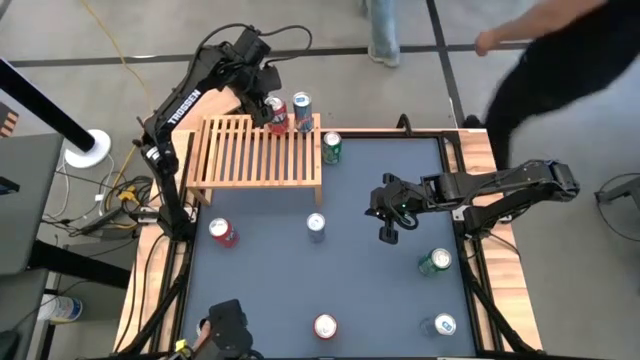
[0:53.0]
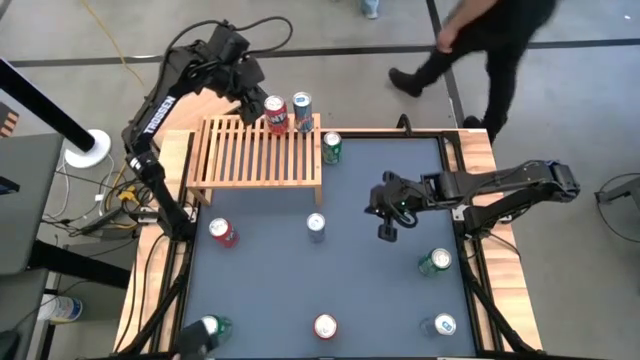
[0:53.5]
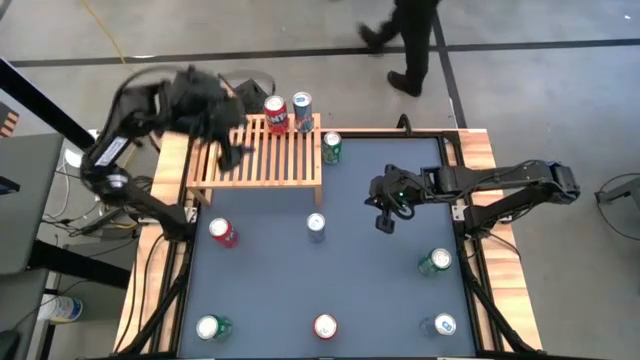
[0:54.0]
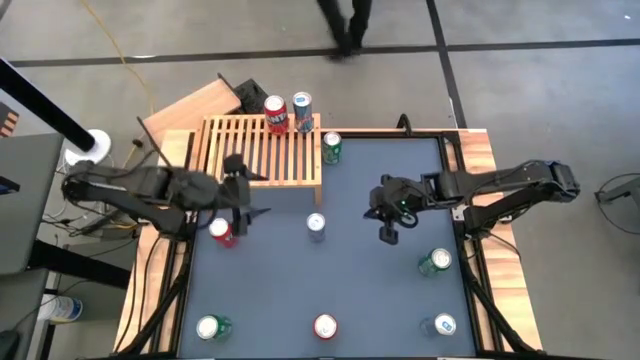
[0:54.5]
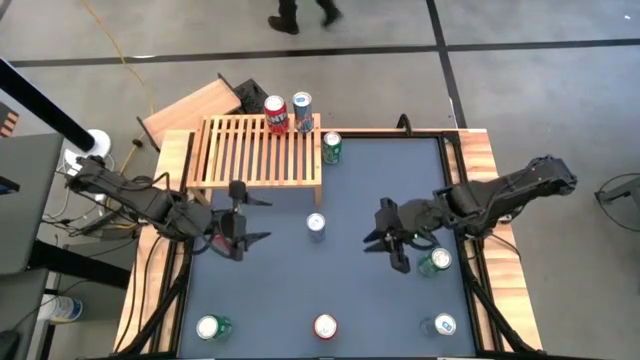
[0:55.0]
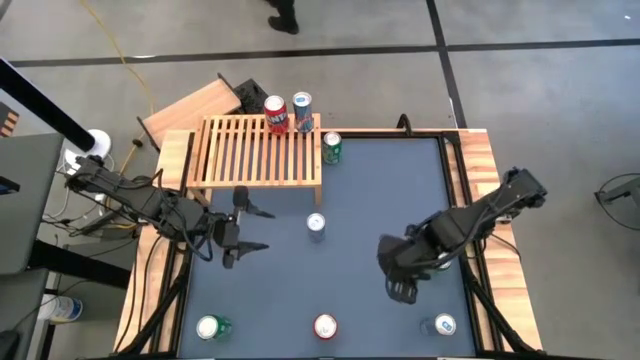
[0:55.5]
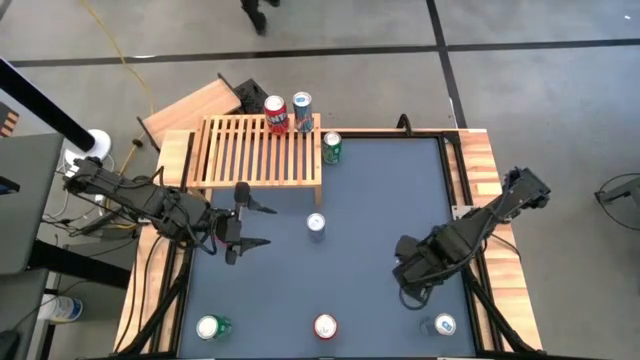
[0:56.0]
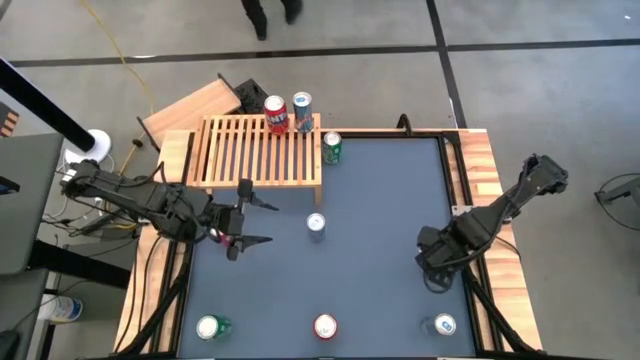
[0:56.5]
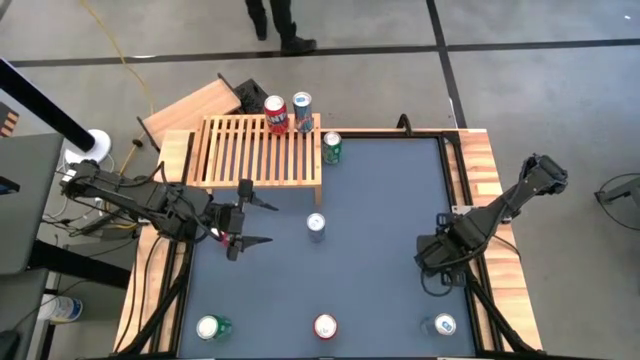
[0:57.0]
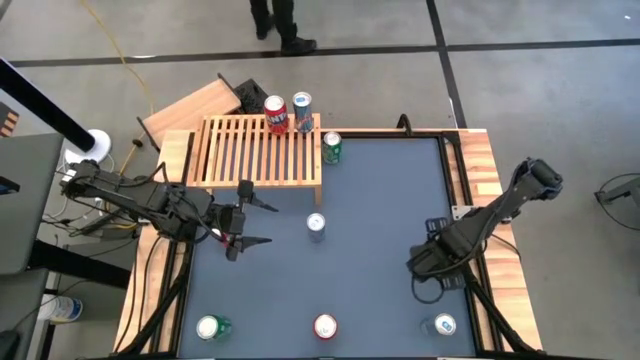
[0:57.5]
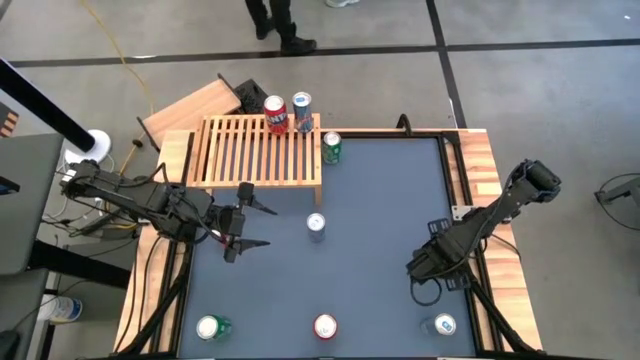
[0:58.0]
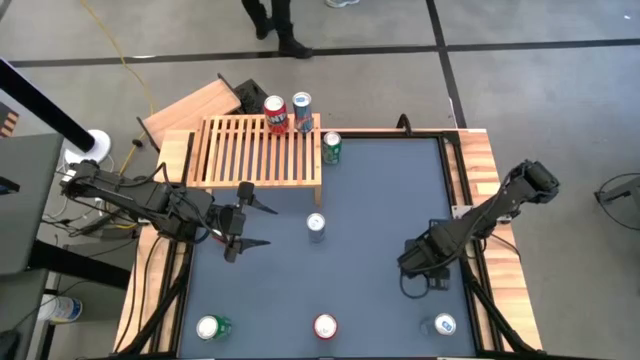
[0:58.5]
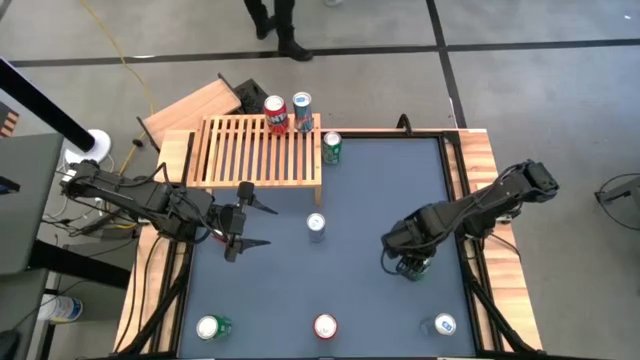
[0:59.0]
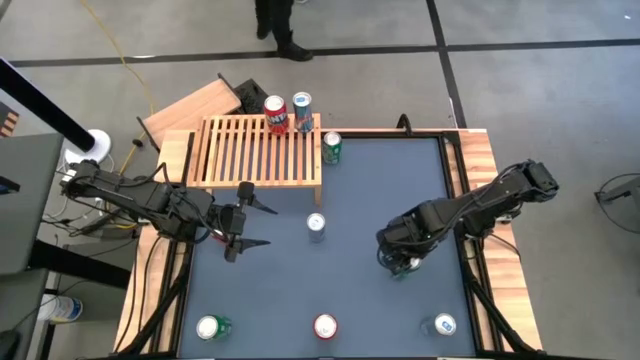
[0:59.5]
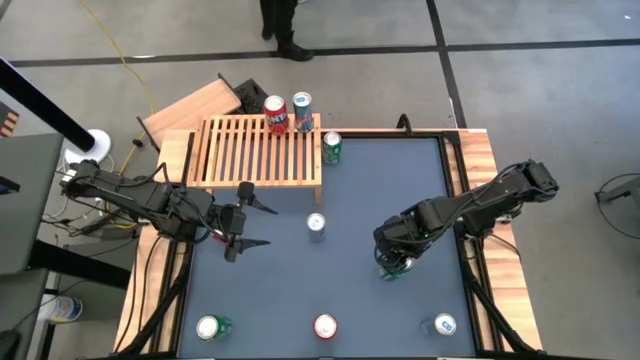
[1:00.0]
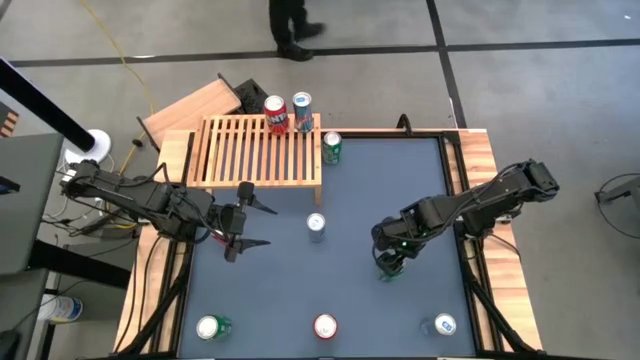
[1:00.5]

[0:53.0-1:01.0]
Task: Place canned beverage on shelf
Put the middle right green soda can on the shelf

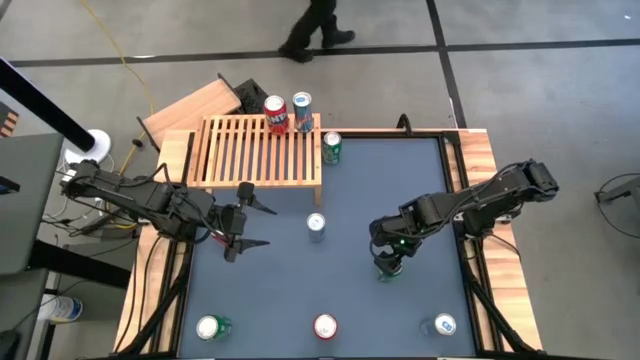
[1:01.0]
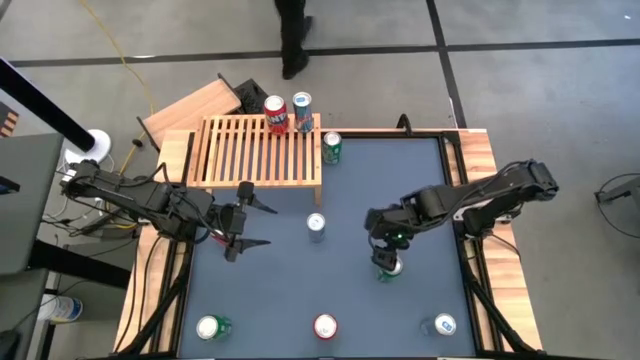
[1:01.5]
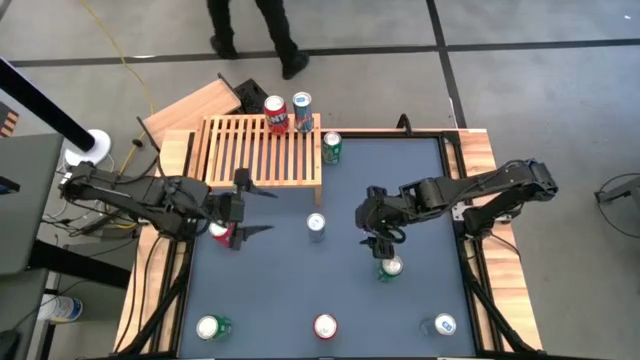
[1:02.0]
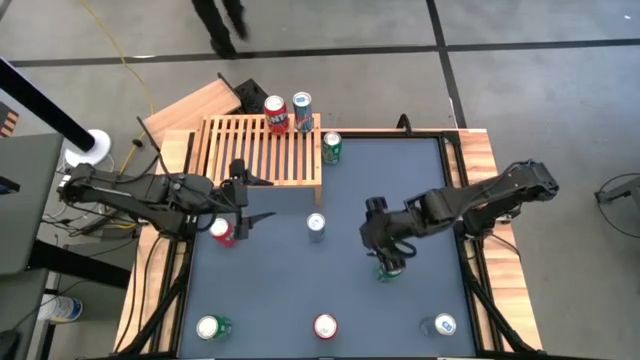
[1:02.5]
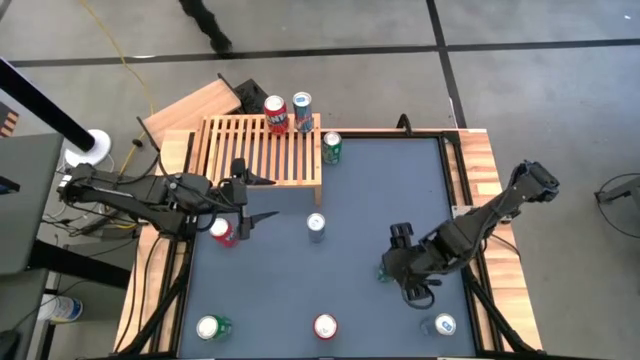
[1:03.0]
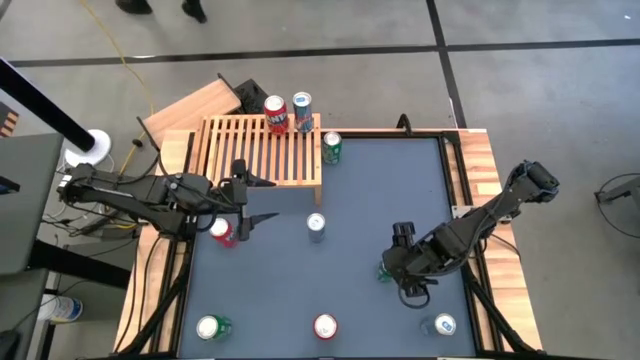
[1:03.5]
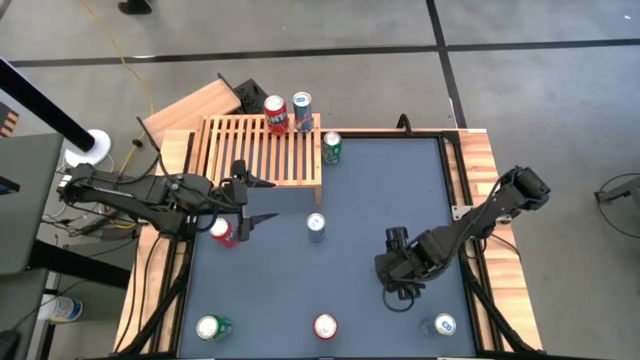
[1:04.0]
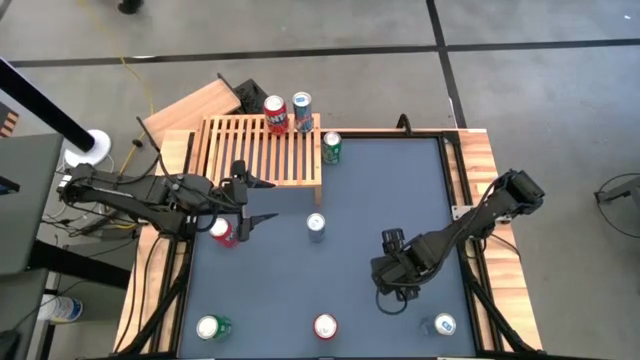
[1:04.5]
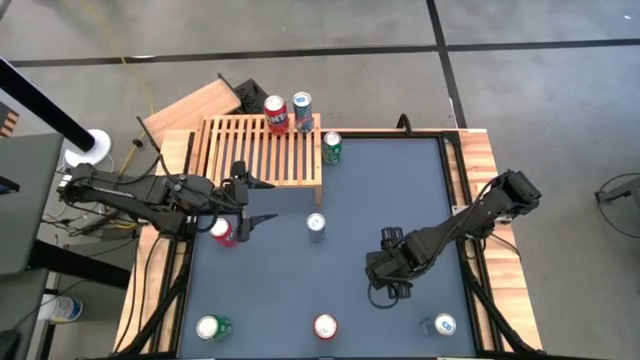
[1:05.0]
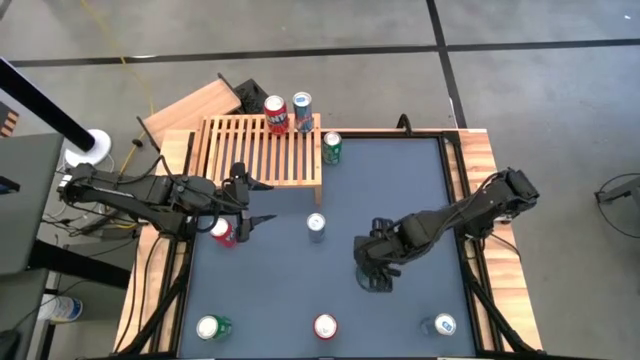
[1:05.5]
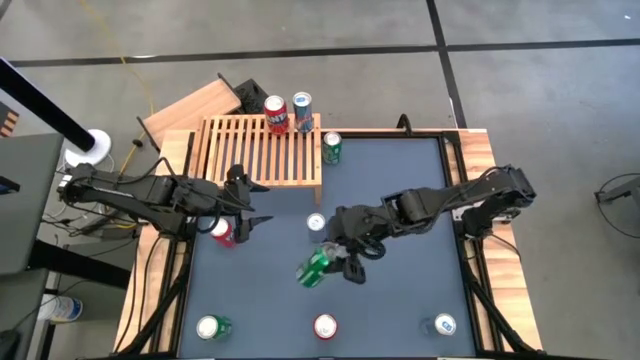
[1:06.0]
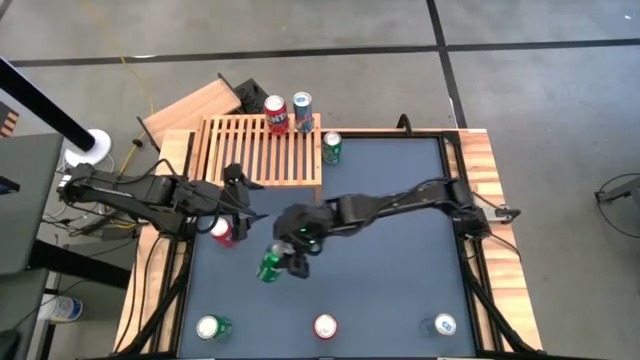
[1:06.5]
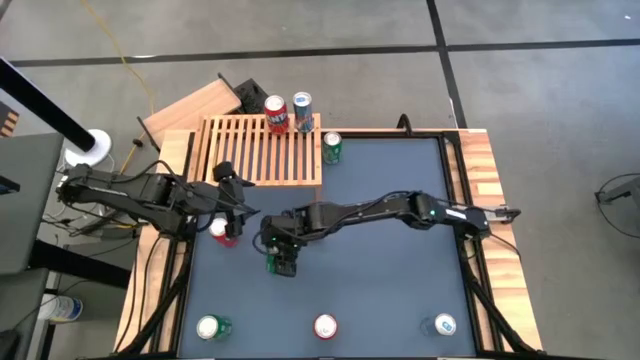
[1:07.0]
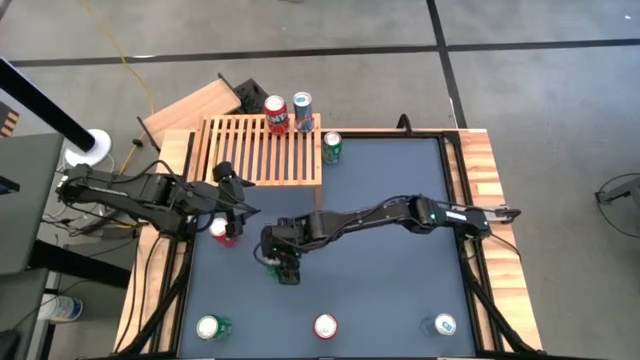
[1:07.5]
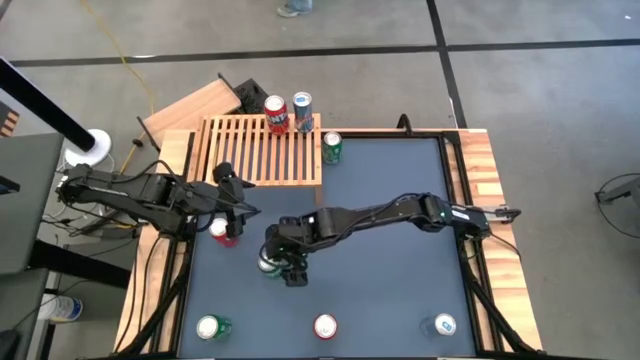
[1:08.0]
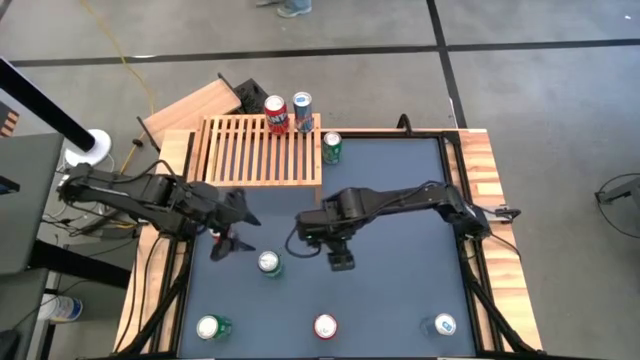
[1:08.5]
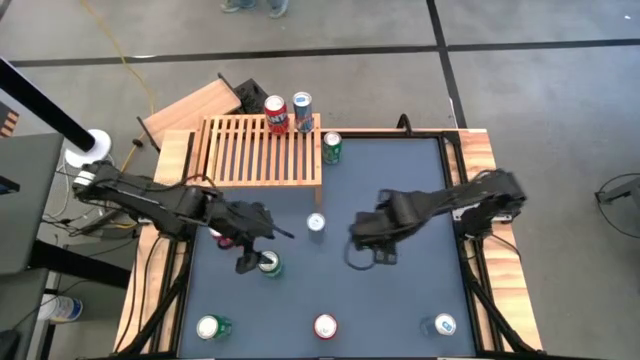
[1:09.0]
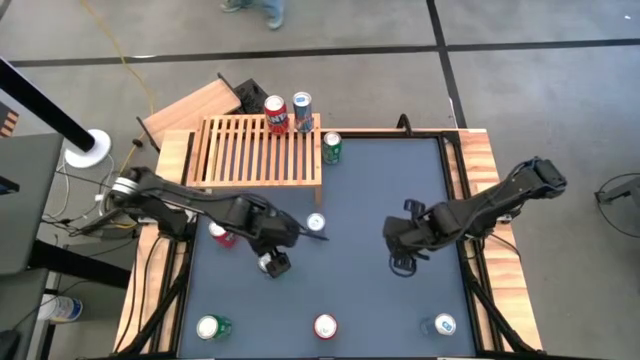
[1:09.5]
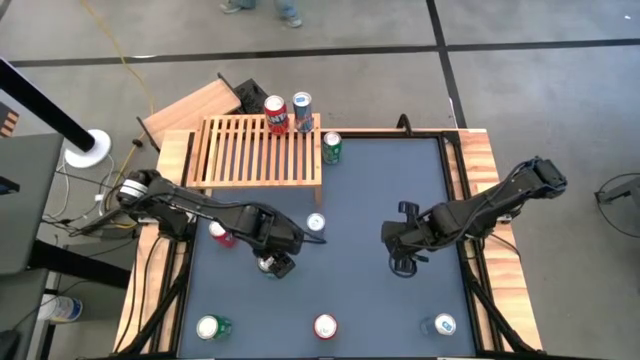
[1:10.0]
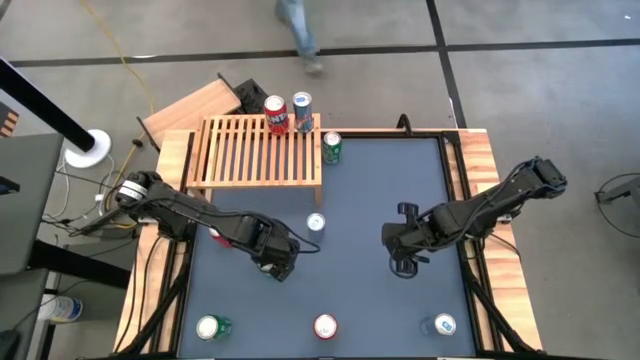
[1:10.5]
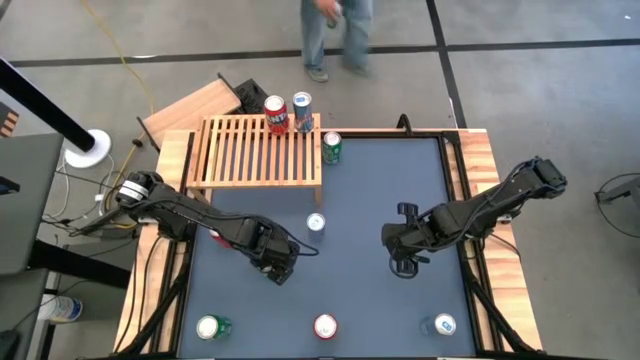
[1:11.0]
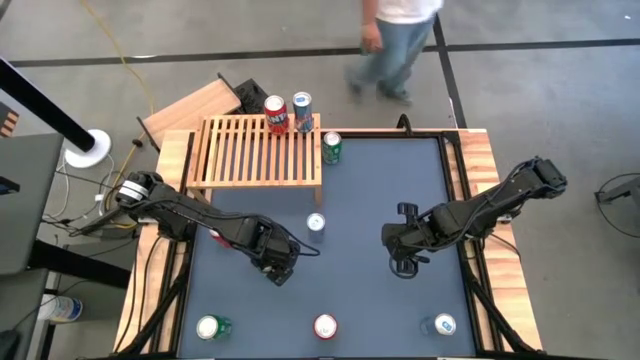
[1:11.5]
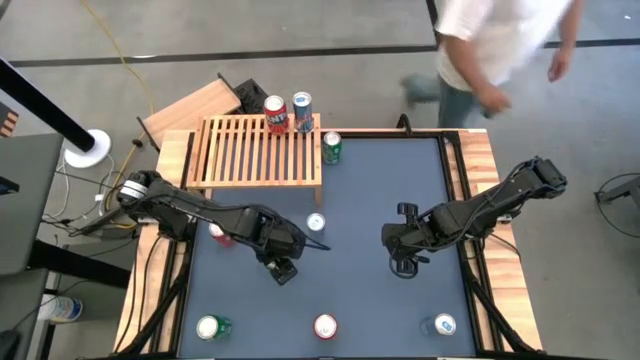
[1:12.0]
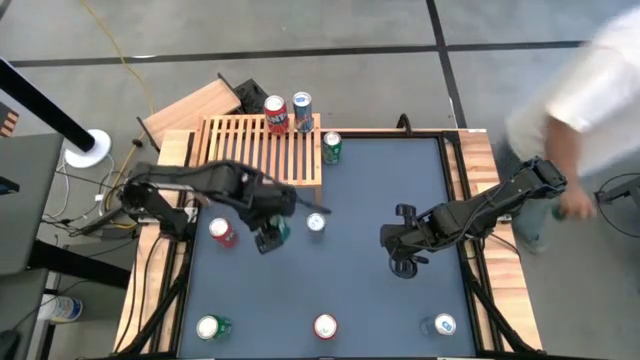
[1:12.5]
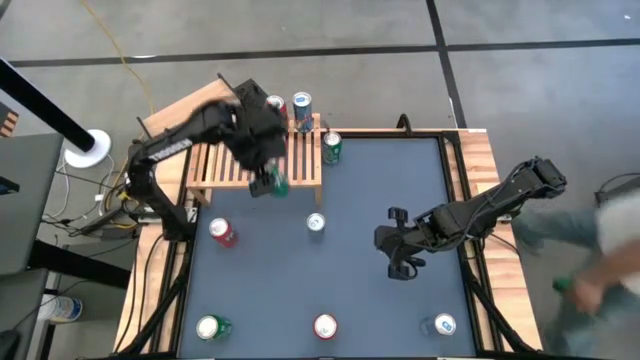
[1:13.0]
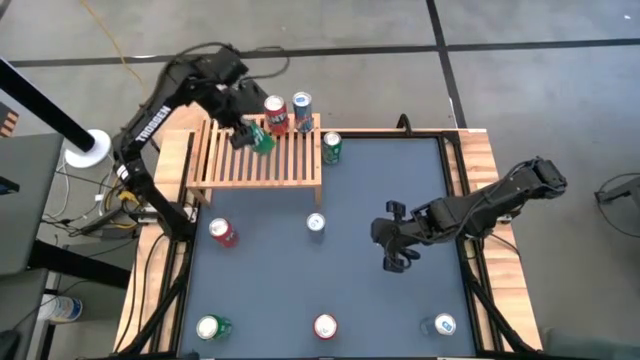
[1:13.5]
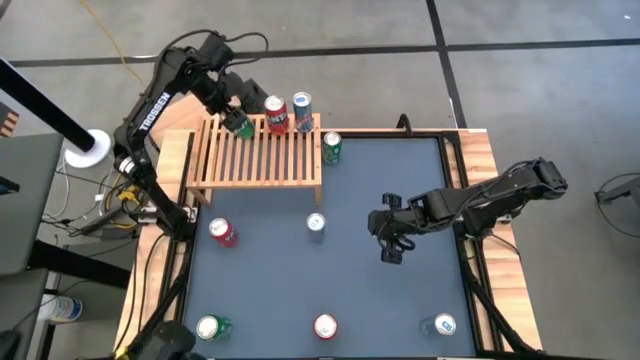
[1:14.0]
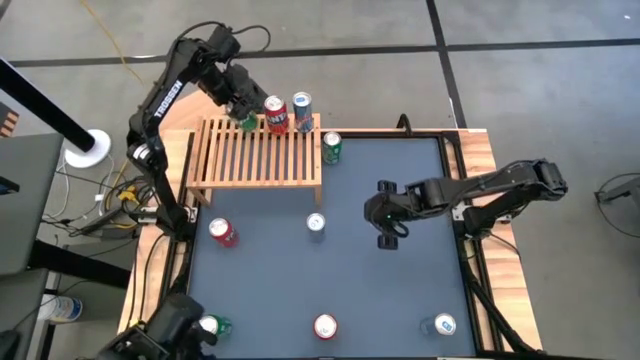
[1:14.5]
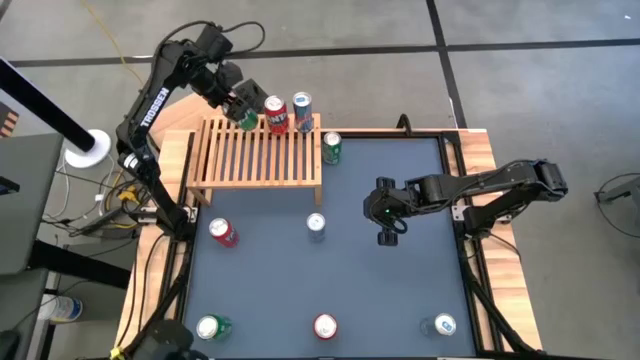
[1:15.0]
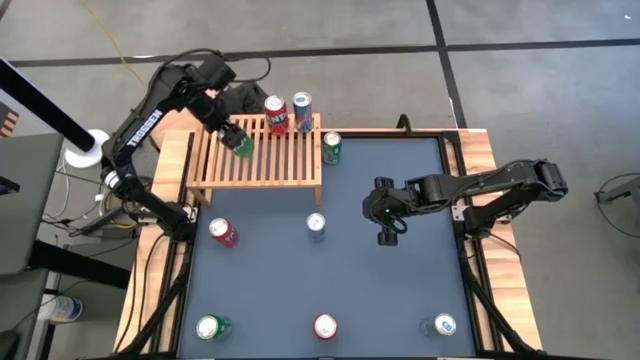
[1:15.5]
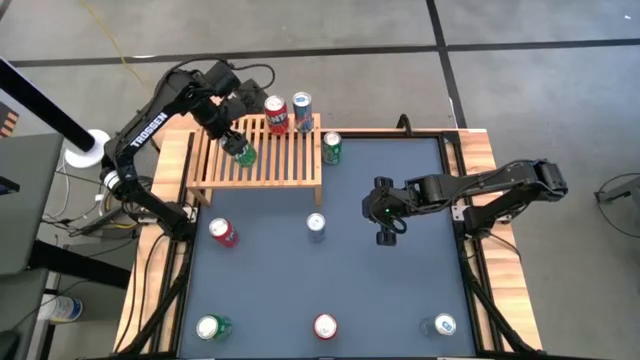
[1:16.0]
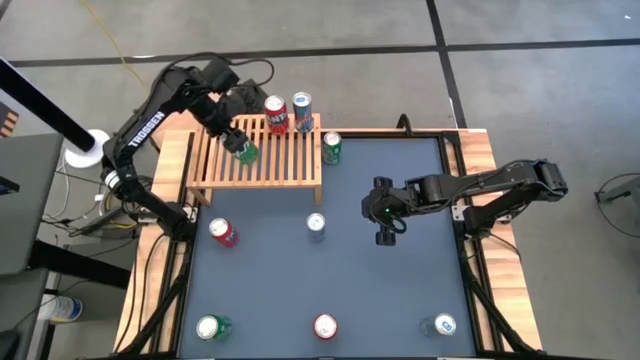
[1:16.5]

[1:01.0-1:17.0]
Put the middle right green soda can on the shelf
